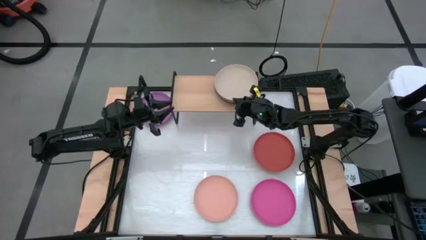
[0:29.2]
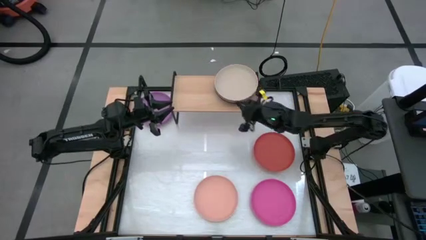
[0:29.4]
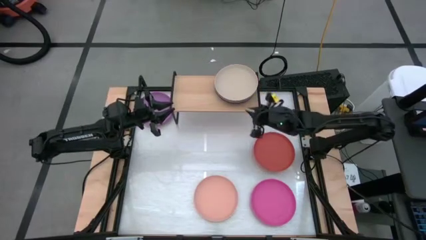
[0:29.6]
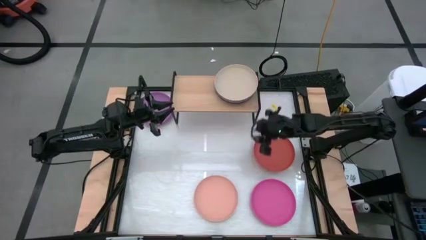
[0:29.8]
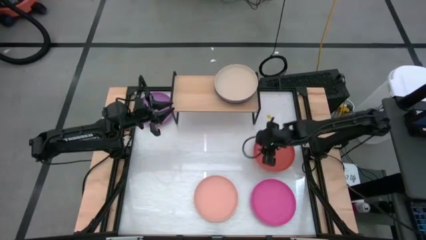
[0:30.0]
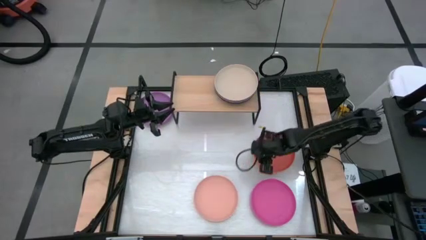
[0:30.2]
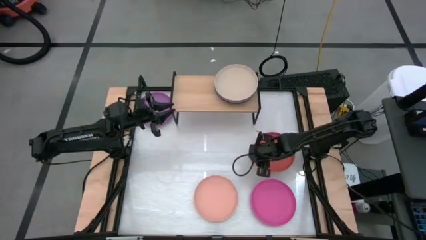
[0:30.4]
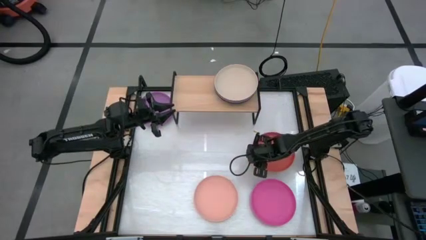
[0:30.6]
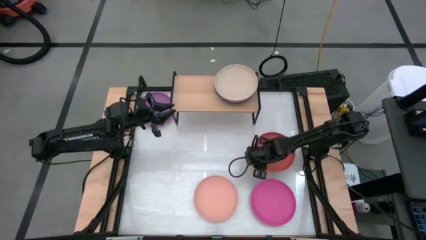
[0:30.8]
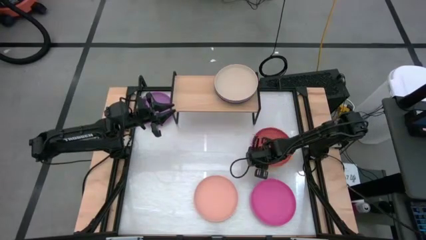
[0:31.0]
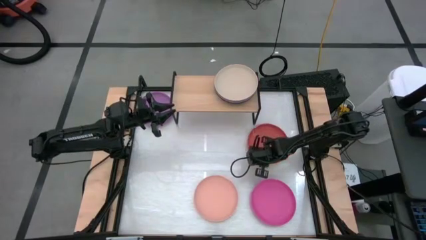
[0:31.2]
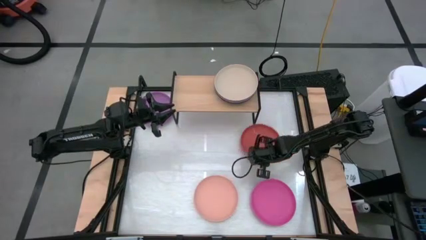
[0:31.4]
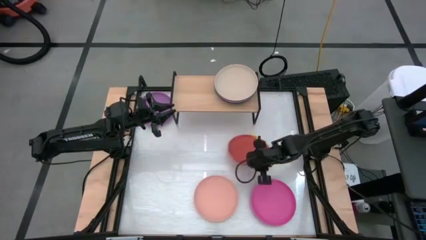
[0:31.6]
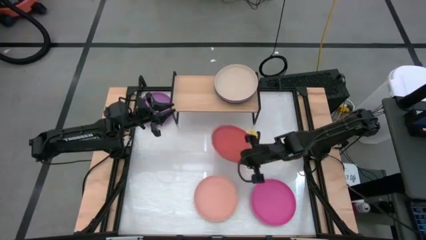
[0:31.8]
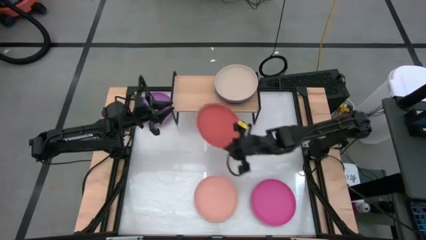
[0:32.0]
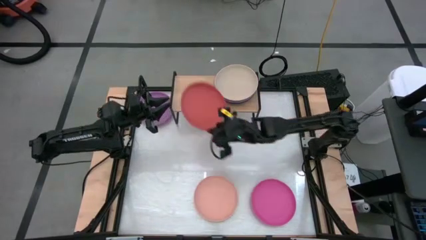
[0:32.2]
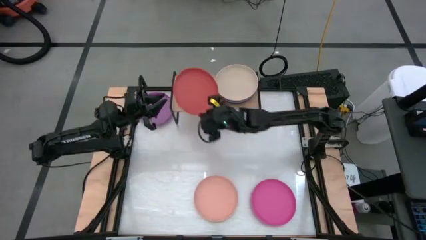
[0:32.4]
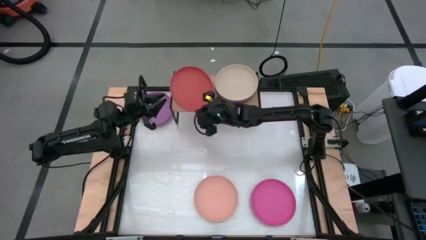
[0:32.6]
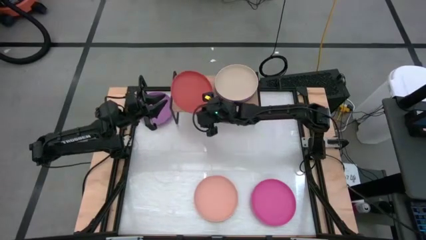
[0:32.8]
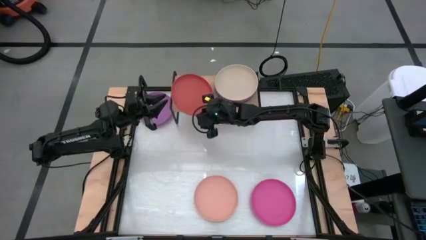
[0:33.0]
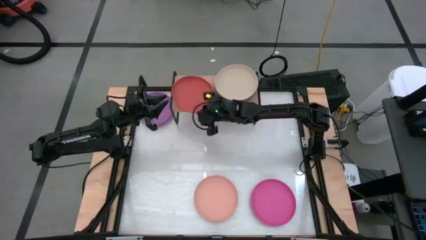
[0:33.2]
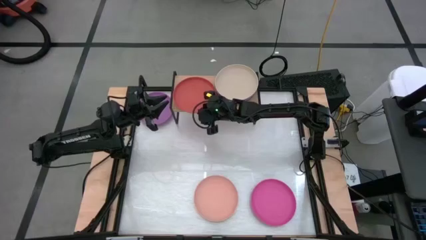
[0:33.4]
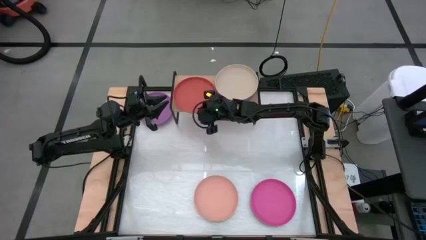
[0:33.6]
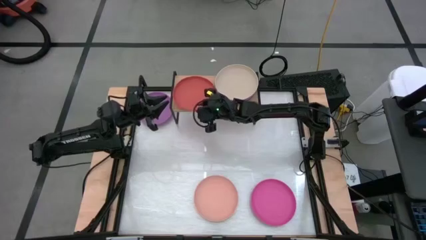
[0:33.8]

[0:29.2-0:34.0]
Task: Place and stack plates onto a shelf
Put the orange plate on the shelf

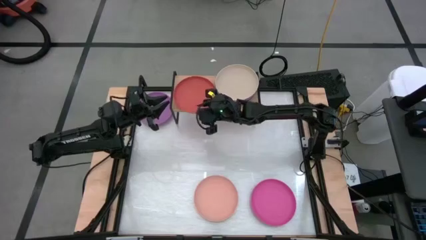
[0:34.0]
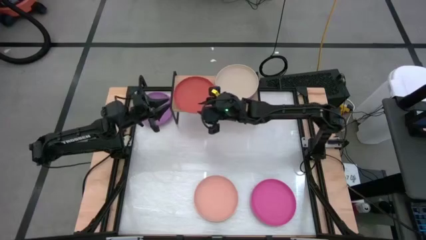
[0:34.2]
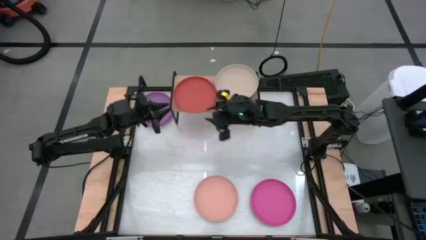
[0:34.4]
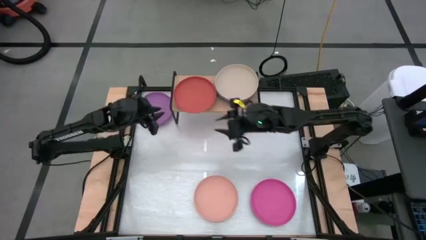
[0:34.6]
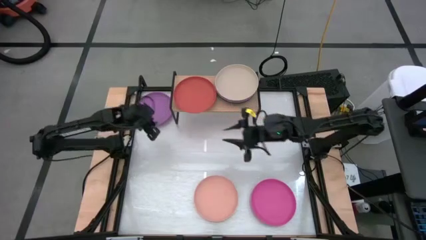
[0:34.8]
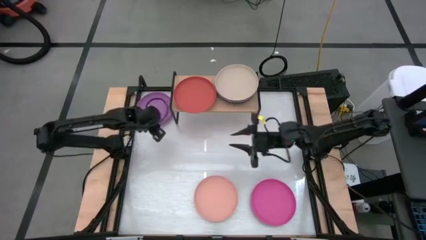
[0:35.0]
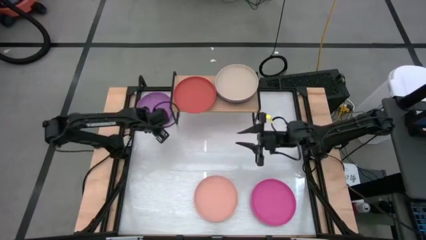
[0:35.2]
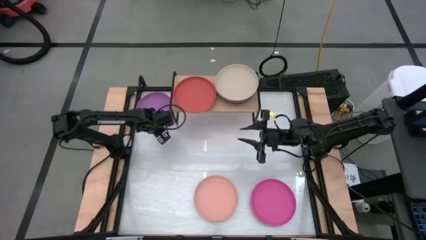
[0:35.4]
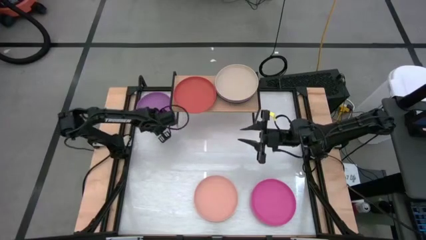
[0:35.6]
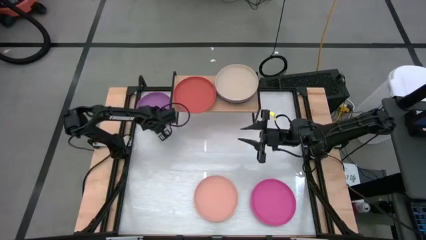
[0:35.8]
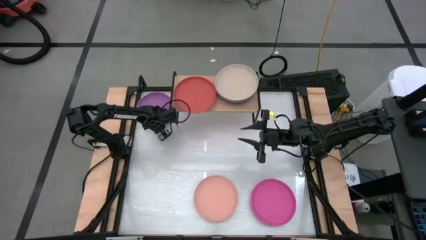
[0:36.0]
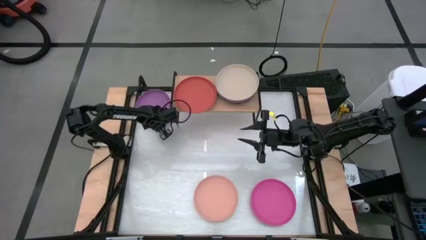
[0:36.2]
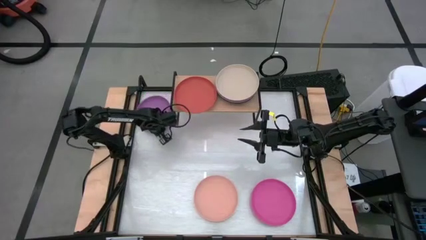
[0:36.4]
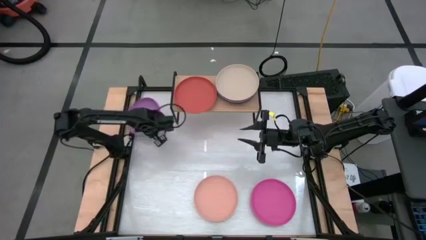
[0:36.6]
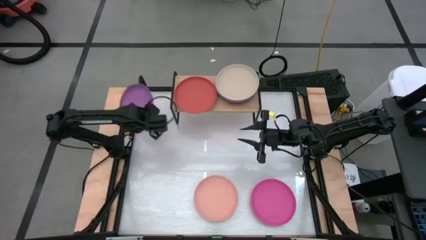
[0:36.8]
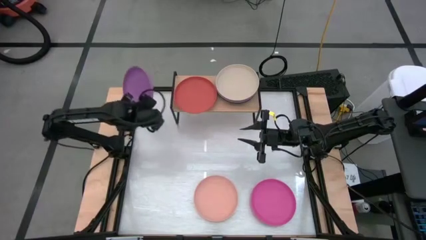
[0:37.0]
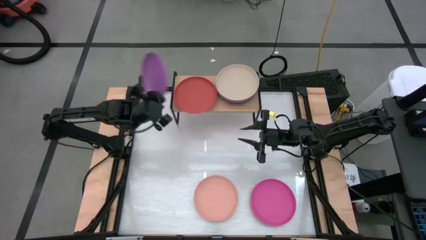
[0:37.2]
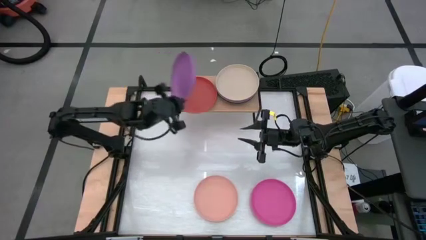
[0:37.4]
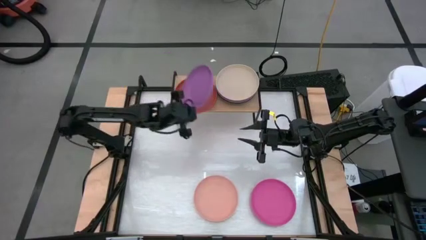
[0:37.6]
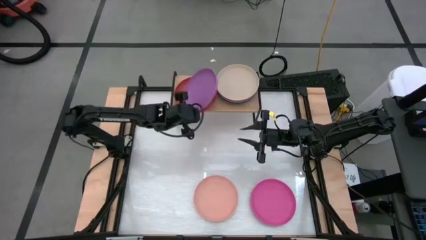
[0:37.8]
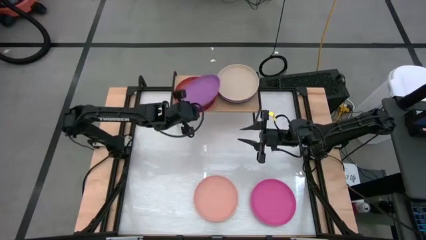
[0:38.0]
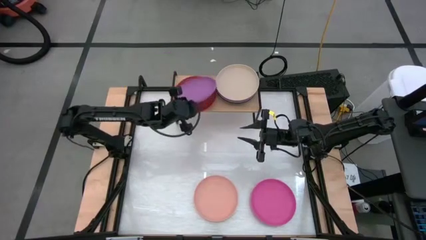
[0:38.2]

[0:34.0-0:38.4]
Stack the purple plate on top of the orange plate on the shelf

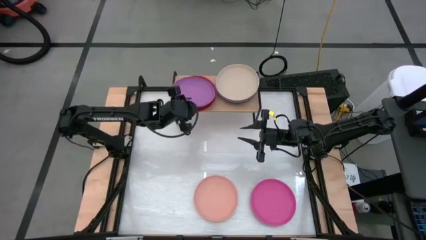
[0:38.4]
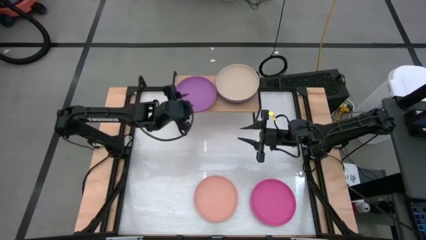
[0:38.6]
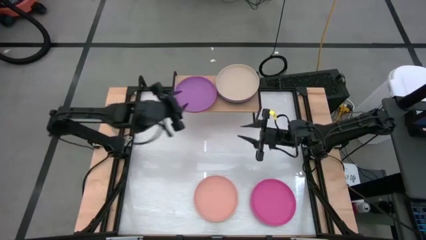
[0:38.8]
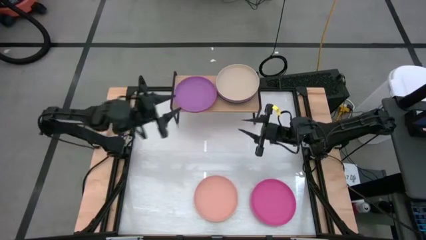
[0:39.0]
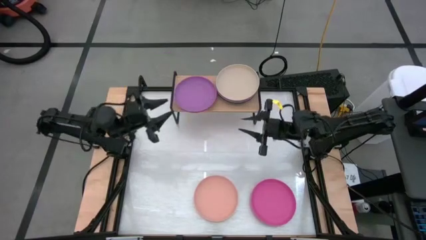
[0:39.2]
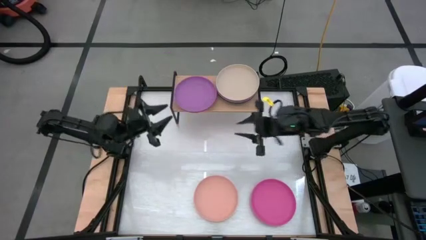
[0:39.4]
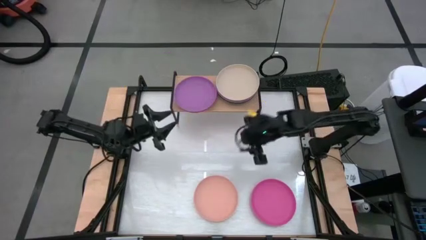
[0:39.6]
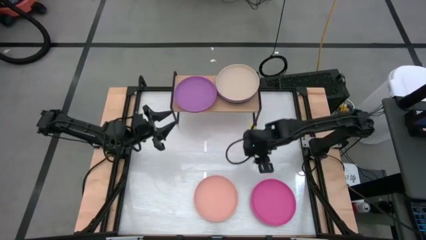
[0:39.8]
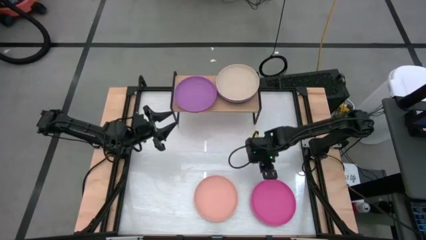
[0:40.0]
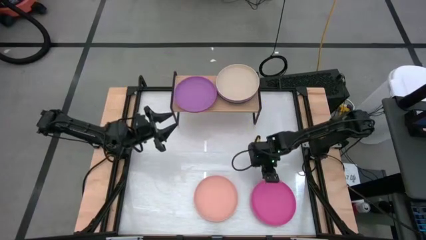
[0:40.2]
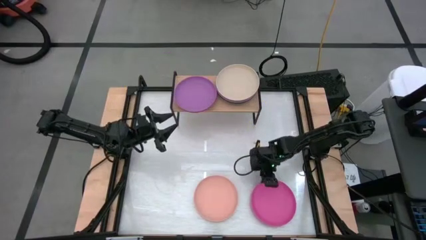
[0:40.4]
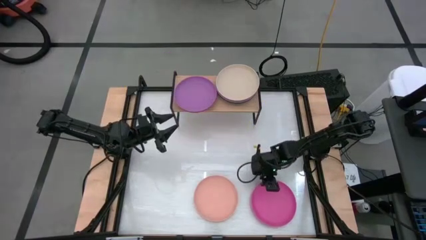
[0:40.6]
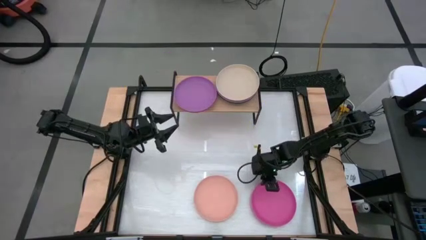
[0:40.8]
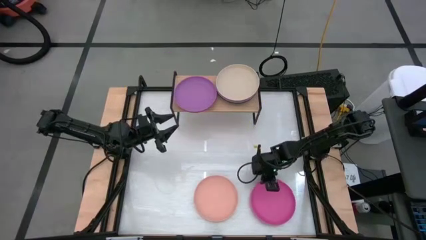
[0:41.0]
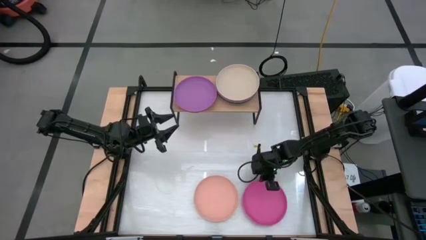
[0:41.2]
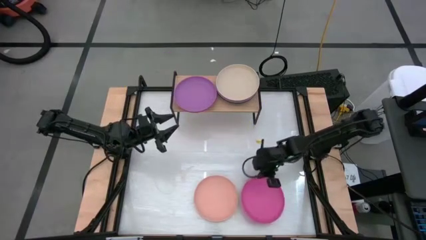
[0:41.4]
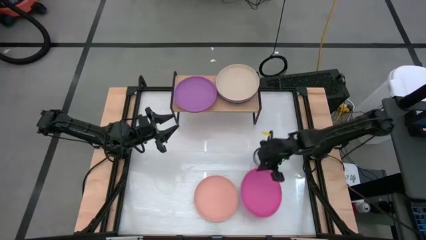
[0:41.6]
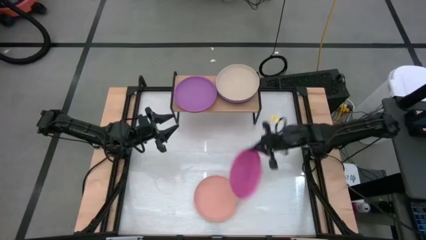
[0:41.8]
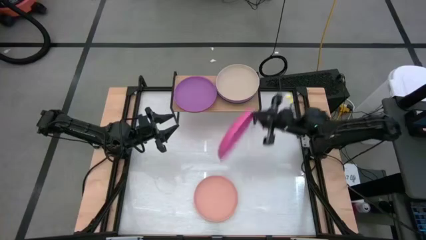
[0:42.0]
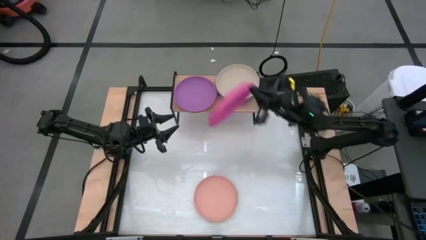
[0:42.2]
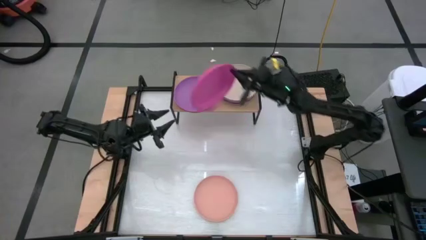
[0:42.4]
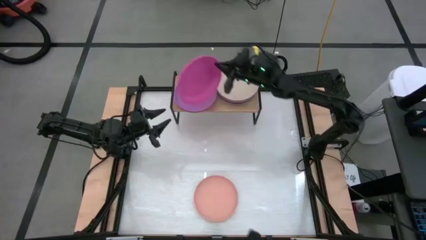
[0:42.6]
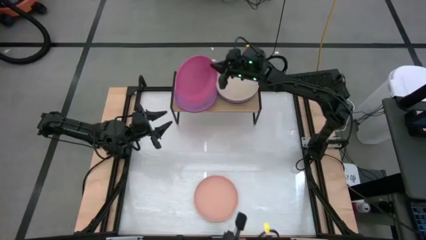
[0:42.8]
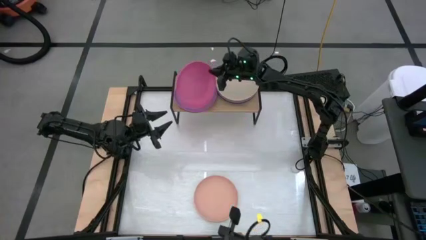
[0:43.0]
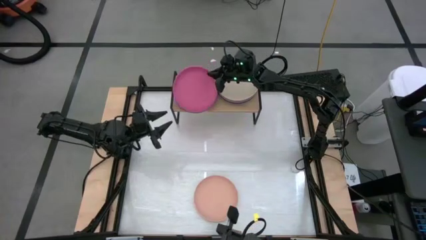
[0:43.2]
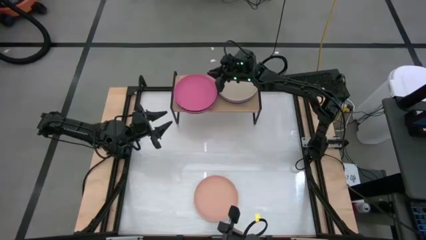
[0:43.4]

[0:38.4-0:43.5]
Stack the pink plate on top of the purple plate on the shelf

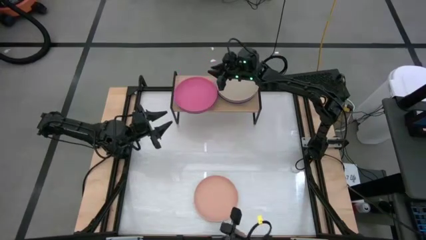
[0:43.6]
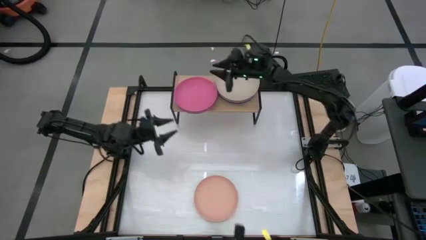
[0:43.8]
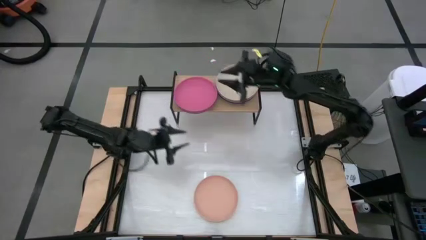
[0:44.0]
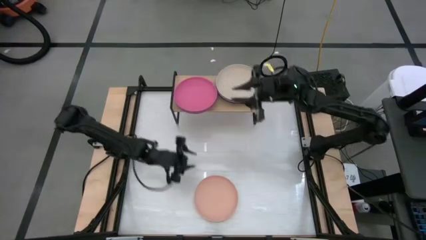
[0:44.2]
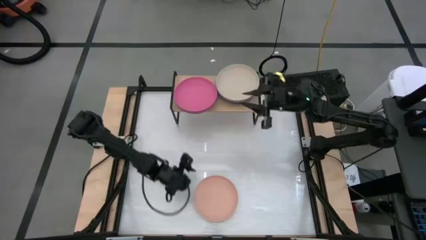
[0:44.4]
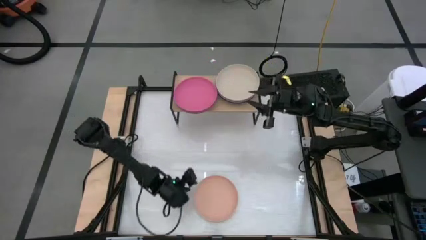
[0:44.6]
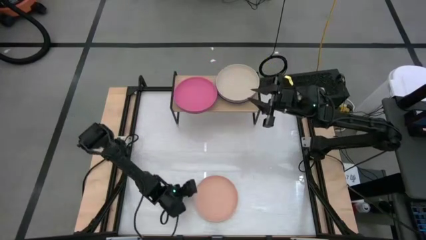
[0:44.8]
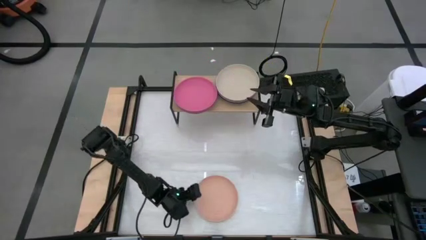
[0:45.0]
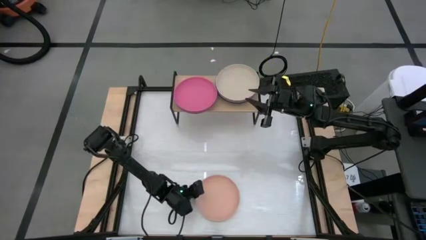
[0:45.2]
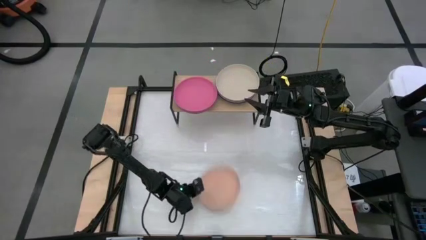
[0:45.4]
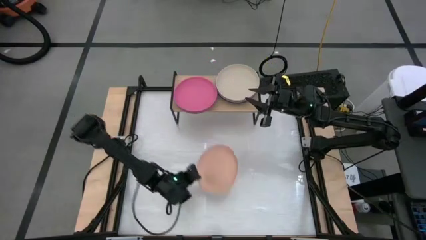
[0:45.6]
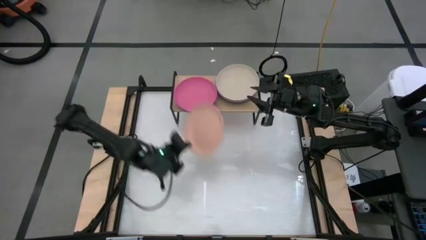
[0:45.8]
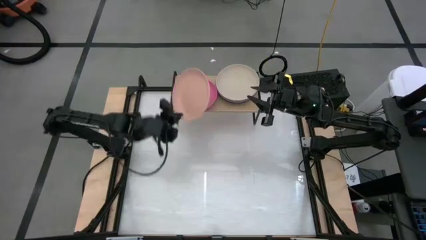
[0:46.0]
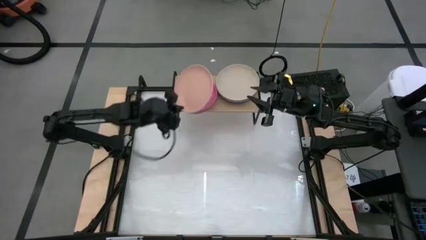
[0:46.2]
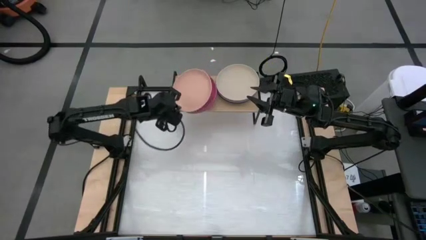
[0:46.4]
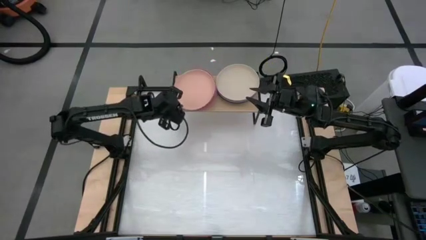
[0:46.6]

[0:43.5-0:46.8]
Stack the brown plate on top of the pink plate on the shelf
